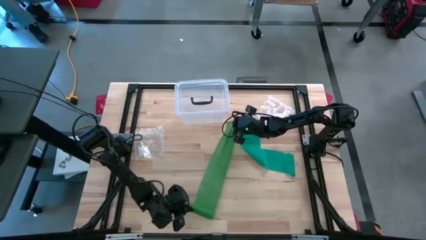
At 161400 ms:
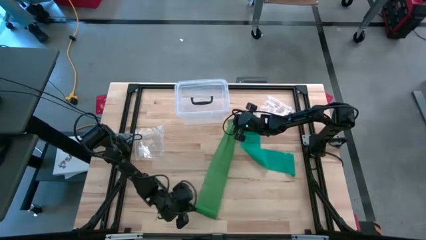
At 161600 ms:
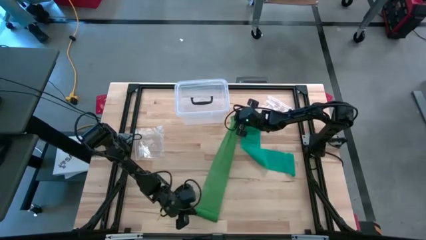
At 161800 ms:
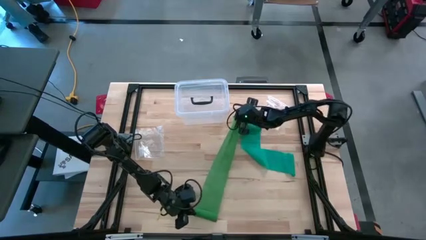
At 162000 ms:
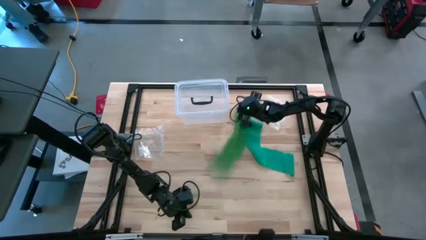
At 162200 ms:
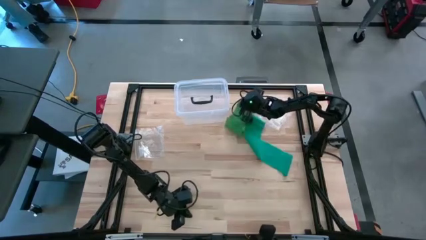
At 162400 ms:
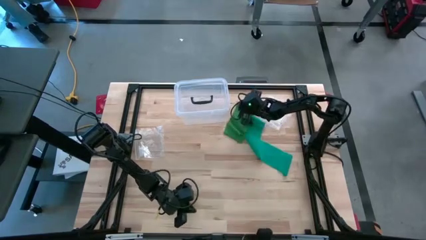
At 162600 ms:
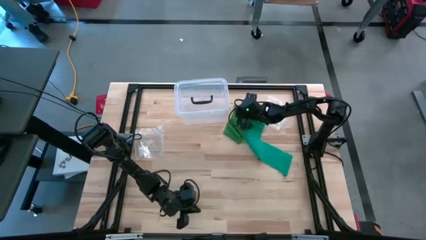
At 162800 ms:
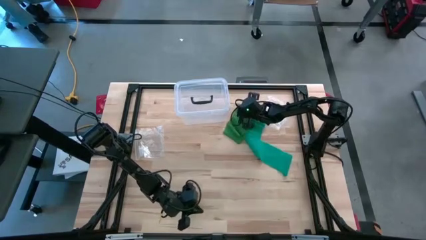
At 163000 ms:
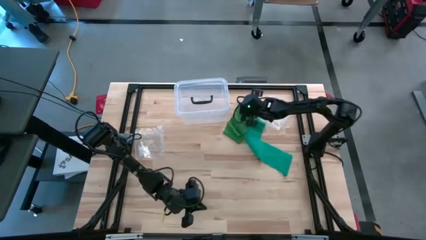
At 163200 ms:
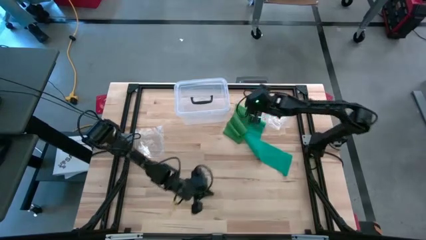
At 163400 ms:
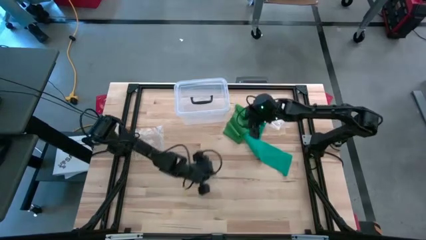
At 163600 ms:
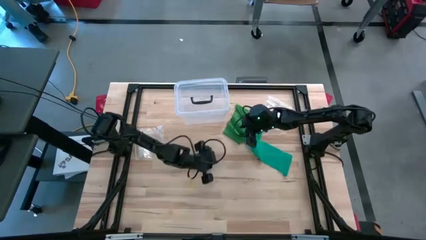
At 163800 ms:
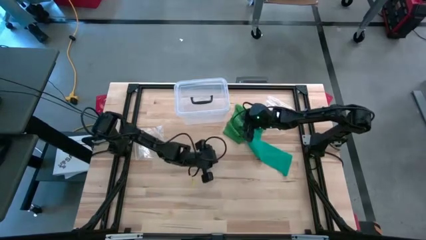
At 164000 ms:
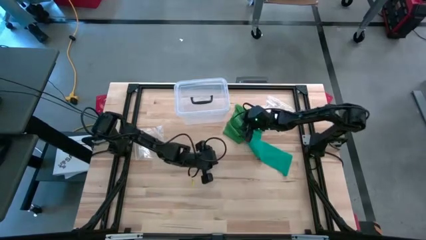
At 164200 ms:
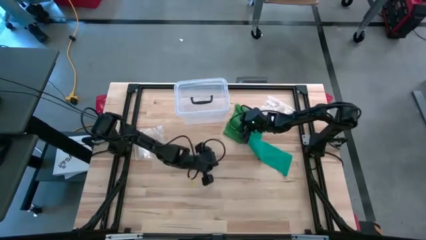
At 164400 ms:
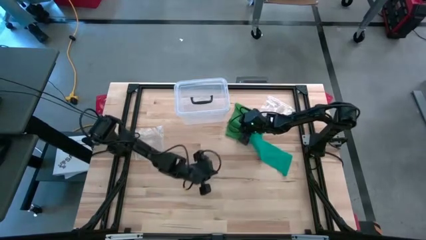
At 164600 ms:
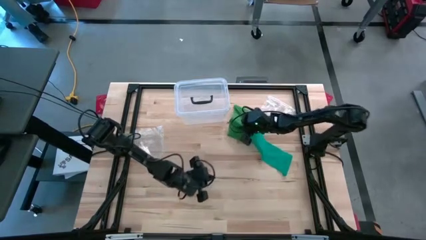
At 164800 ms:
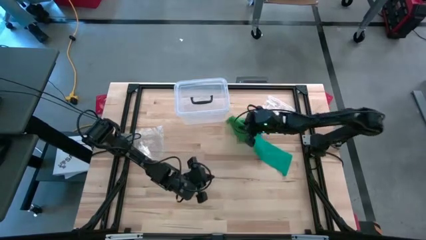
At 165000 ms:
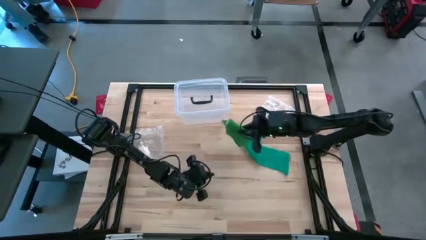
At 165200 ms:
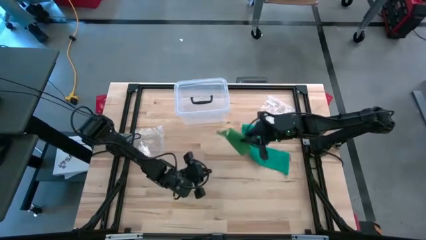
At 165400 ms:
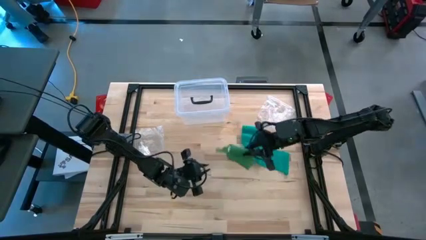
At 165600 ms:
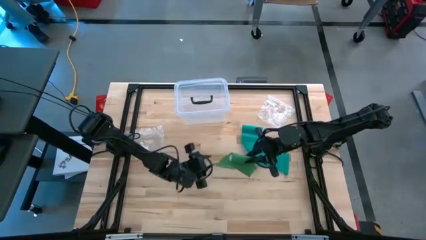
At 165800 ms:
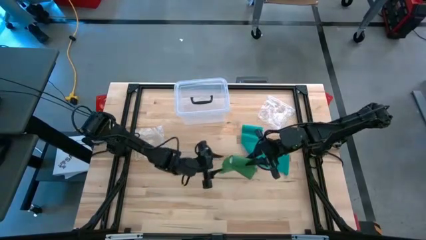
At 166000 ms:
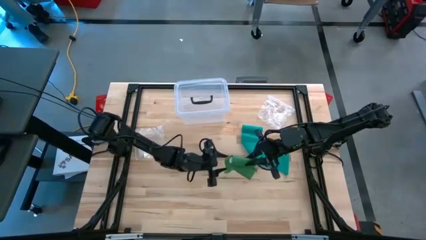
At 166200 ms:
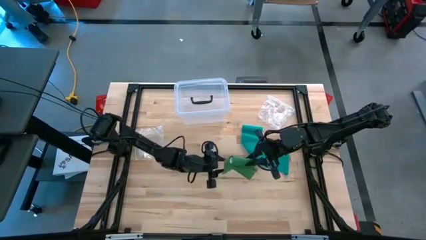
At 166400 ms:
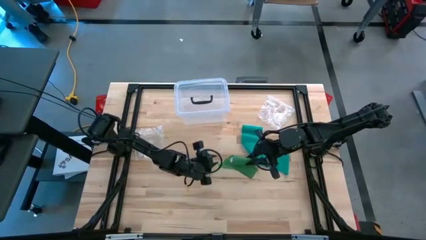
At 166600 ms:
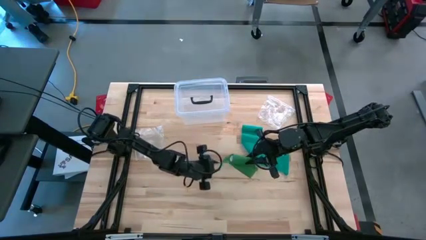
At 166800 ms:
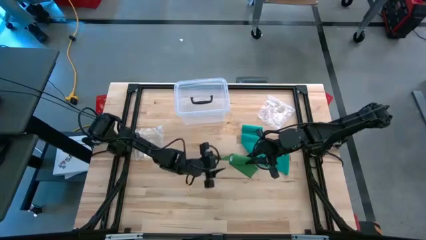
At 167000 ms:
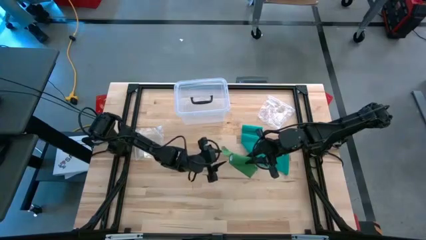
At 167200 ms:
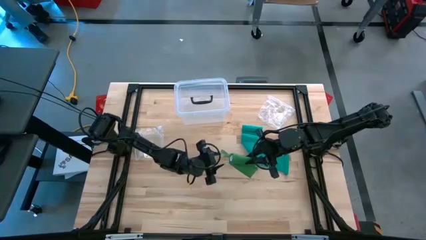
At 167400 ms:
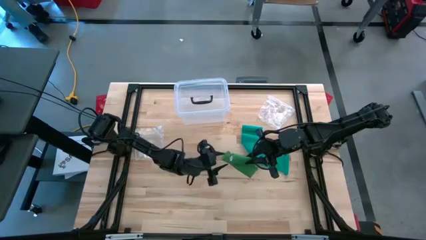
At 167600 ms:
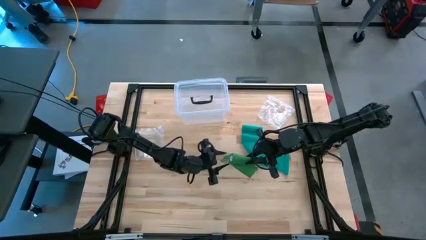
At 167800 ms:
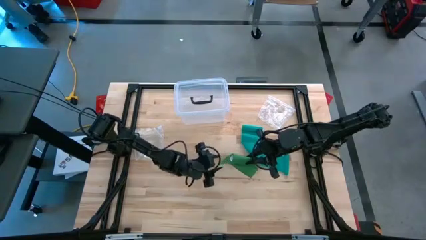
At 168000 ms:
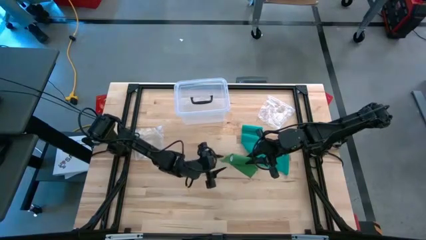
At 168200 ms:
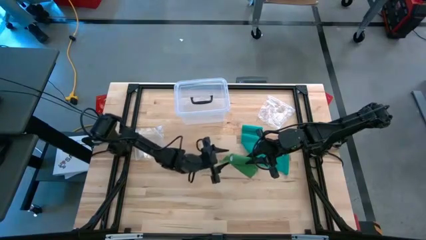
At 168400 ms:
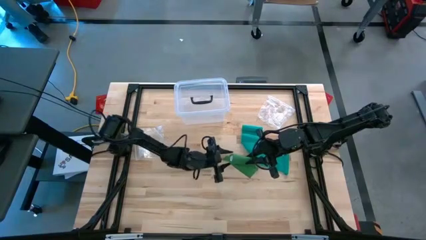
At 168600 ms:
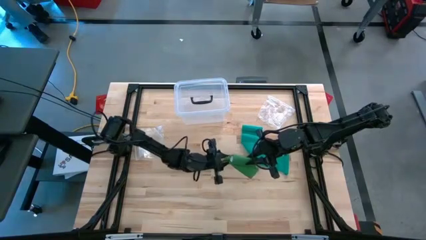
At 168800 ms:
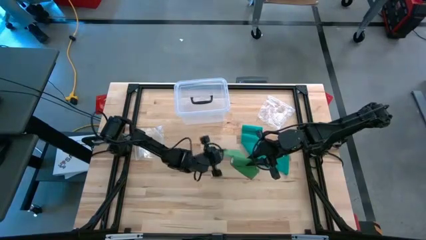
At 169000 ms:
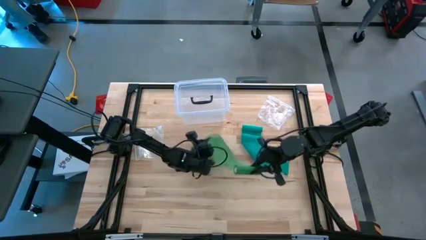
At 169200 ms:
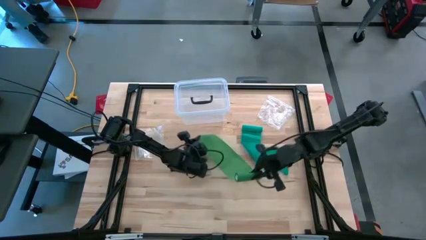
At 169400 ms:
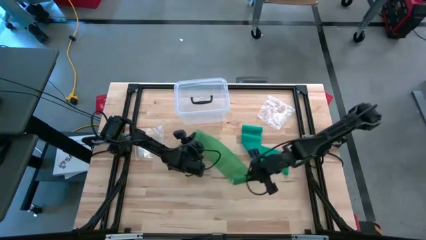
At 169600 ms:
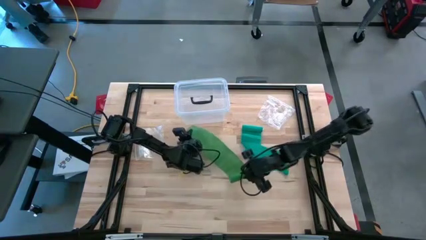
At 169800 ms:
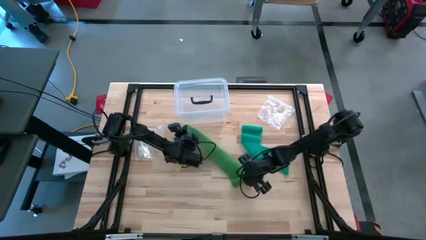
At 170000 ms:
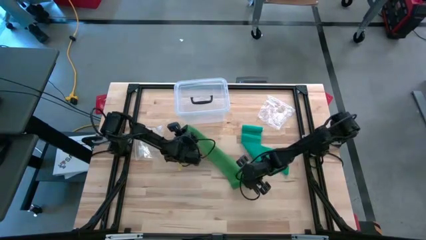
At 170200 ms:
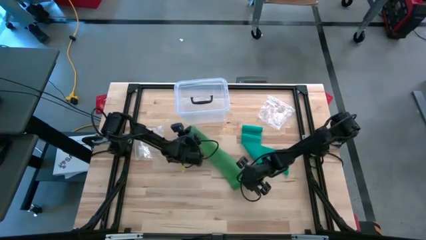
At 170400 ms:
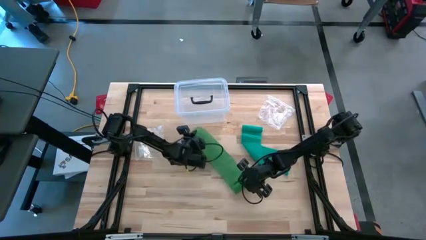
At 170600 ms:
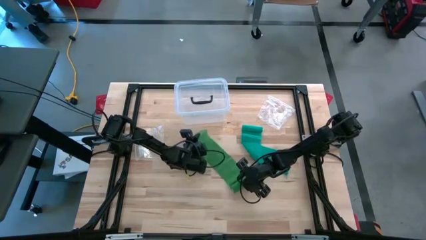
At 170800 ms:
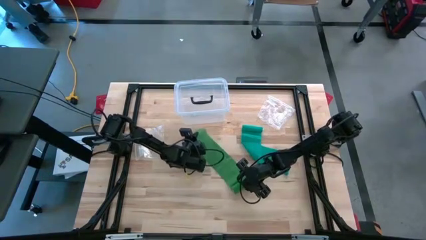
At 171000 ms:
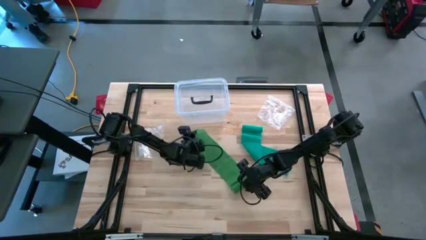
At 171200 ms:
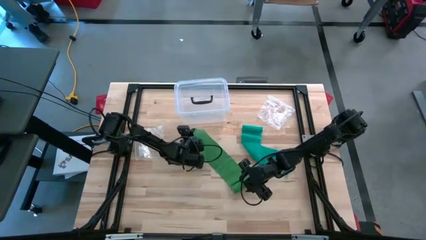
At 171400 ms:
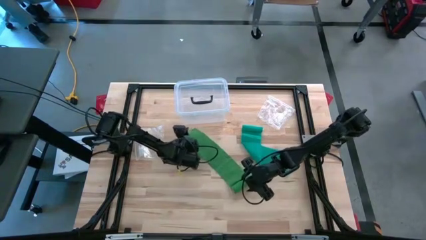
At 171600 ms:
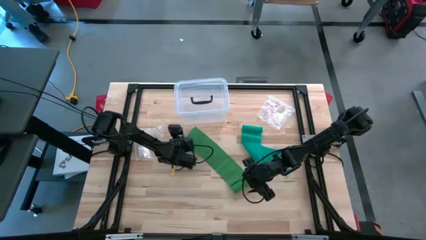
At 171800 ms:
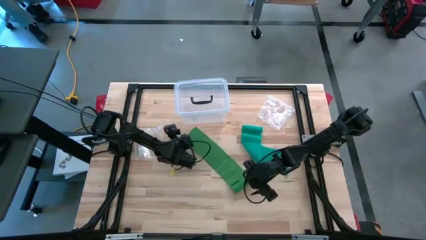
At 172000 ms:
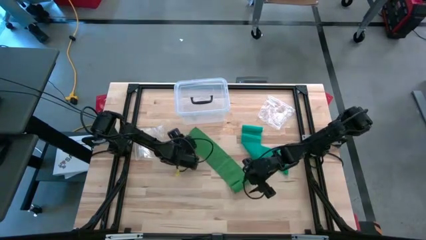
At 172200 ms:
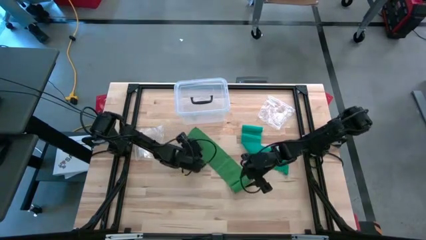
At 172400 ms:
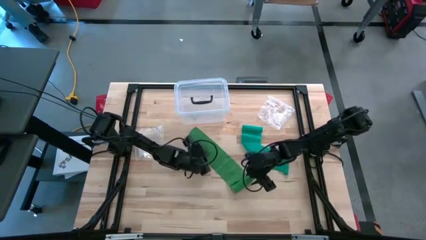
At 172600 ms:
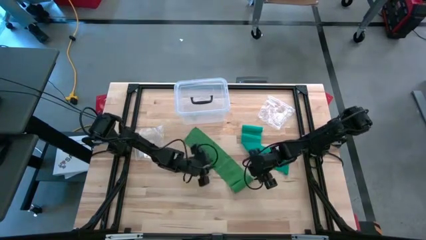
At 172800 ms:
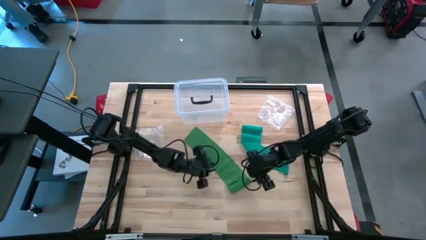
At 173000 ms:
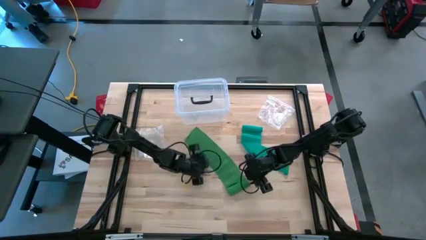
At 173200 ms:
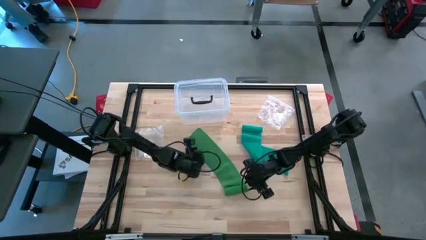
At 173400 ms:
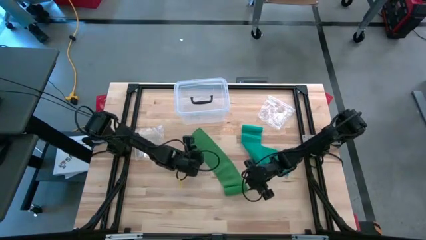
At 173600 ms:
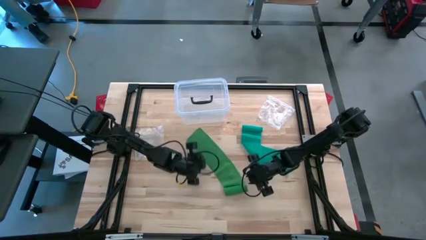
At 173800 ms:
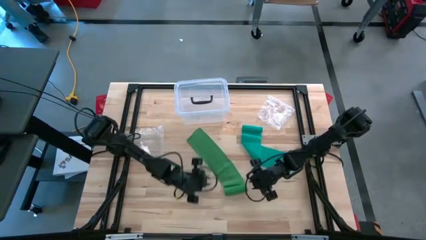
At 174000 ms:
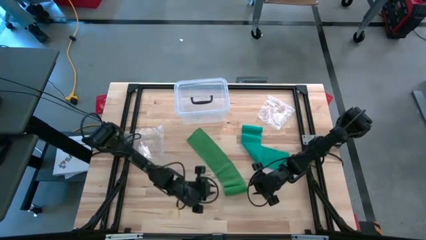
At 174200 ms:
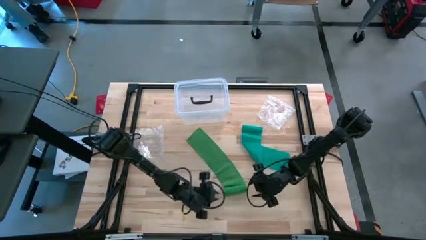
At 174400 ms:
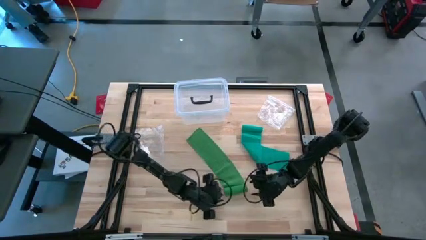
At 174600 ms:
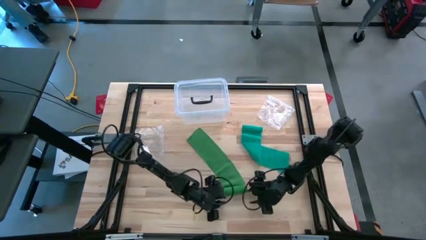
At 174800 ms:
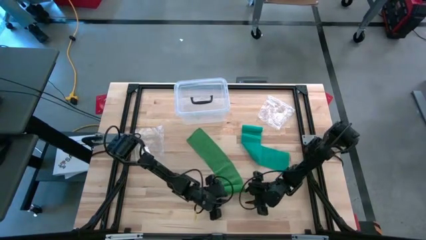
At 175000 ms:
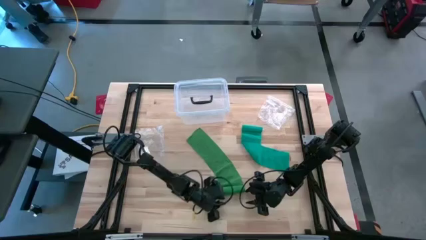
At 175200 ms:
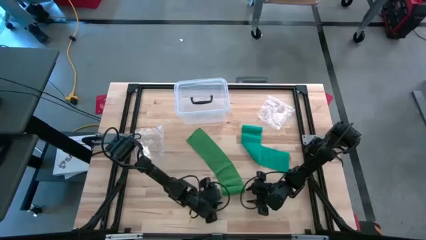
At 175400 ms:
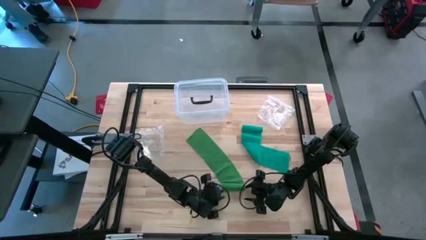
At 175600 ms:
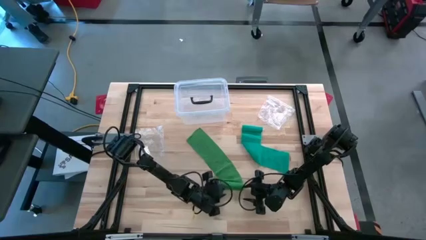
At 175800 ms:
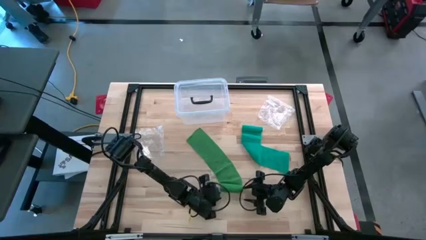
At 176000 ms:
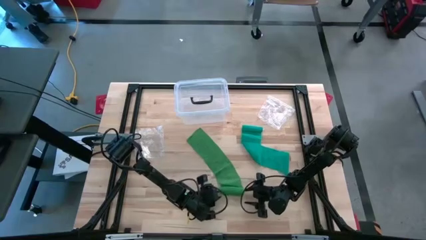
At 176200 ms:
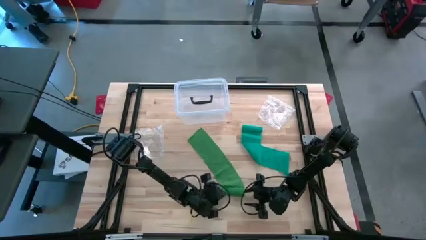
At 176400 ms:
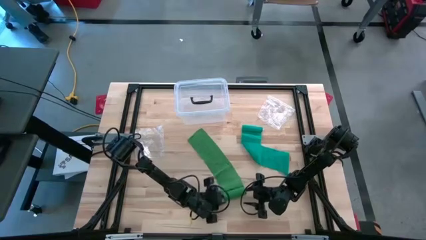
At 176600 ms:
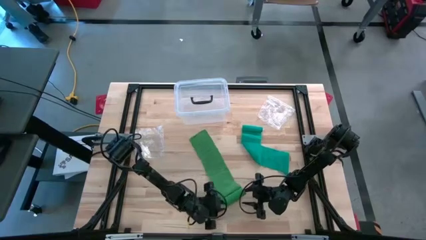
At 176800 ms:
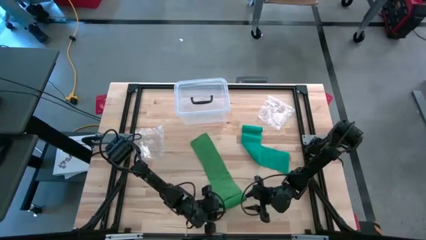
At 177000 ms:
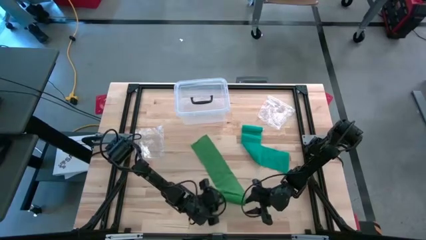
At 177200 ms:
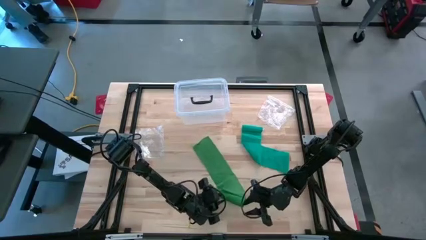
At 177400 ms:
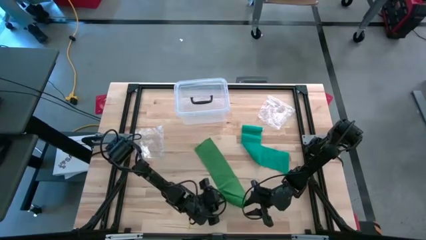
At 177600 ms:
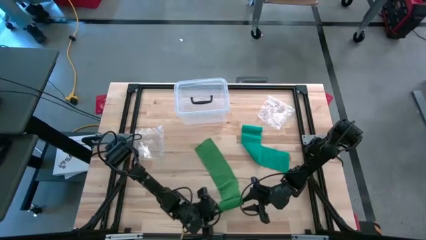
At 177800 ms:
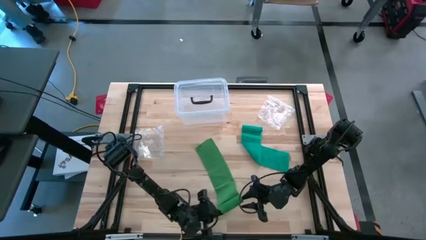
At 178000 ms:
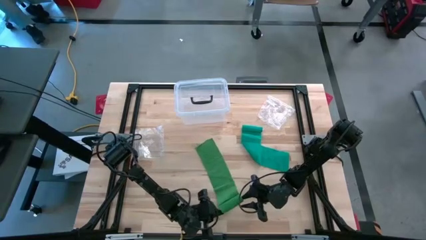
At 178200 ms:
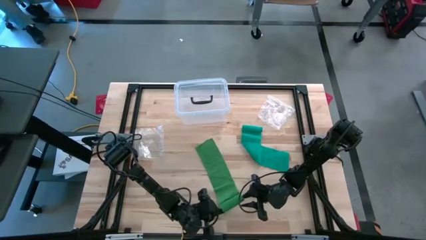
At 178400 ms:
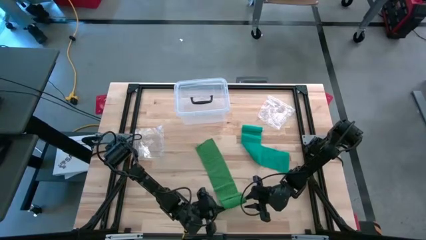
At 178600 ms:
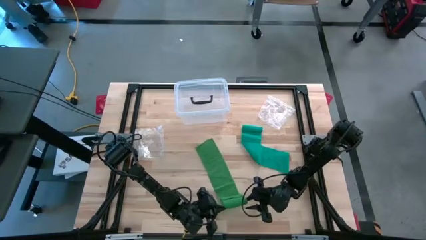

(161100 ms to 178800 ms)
Task: Roll bandage
Roll the green bandage
